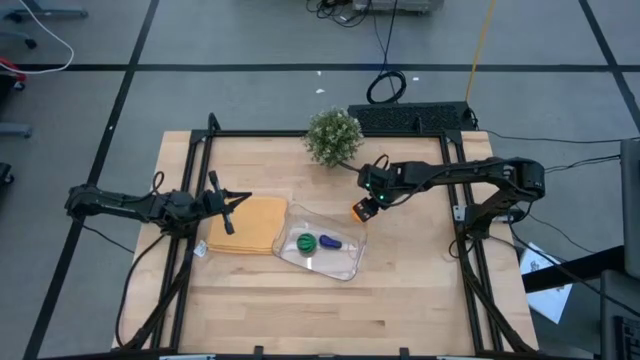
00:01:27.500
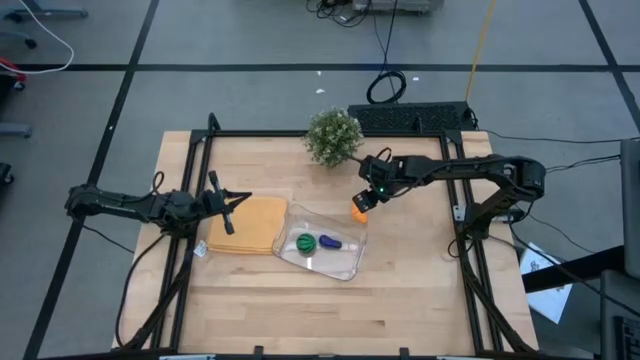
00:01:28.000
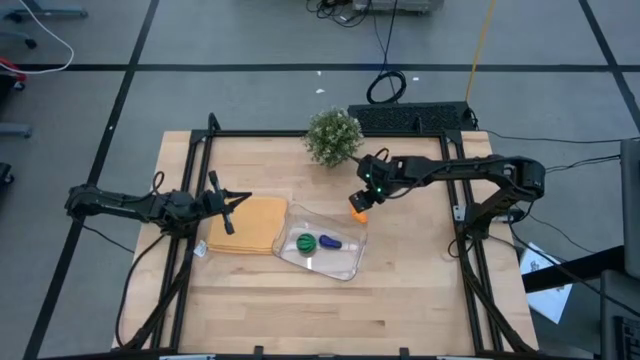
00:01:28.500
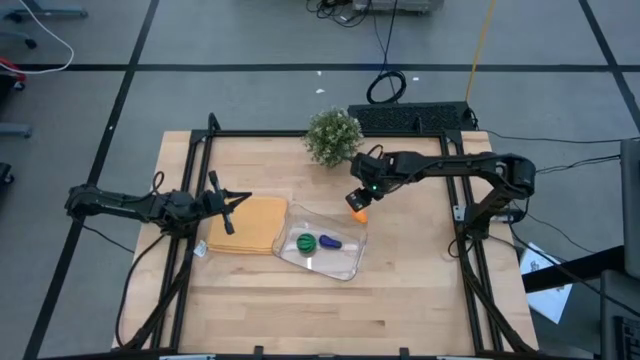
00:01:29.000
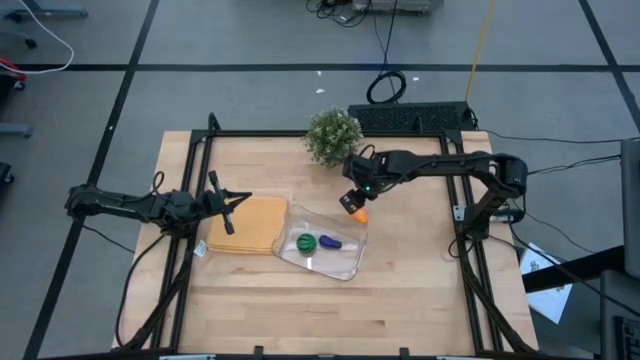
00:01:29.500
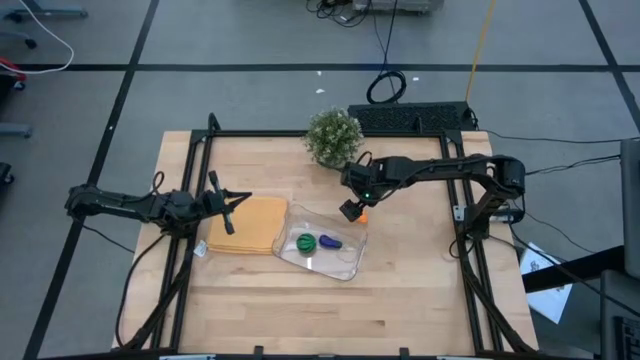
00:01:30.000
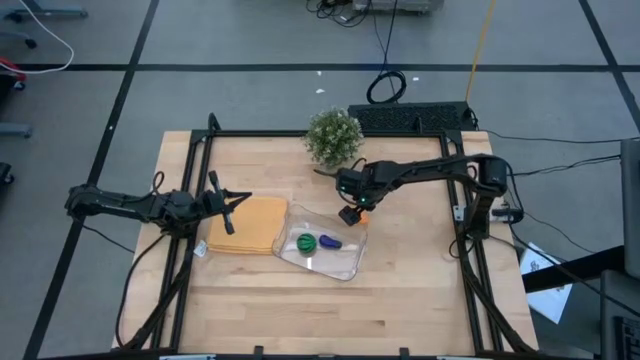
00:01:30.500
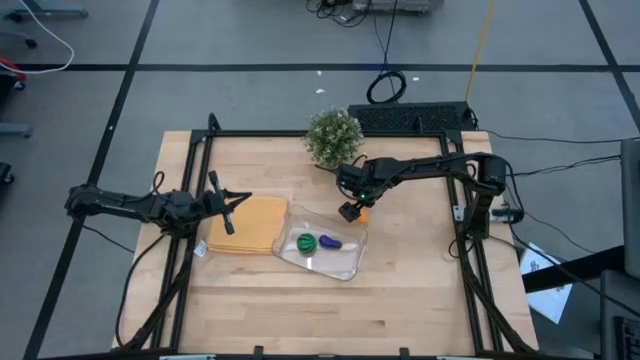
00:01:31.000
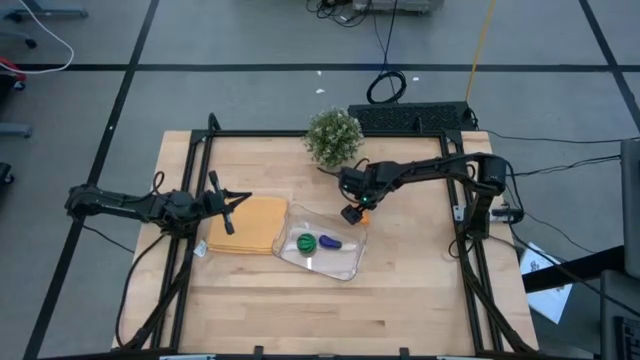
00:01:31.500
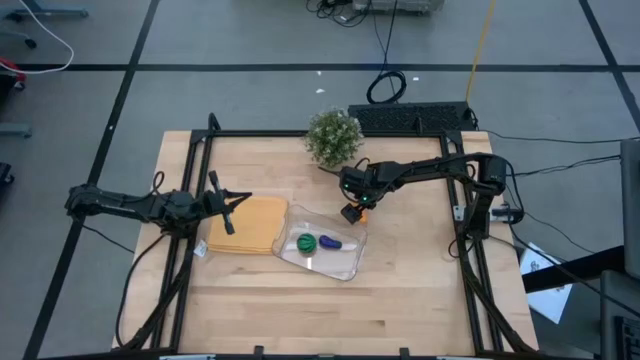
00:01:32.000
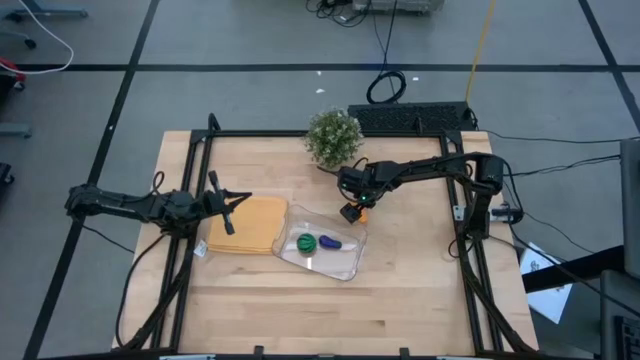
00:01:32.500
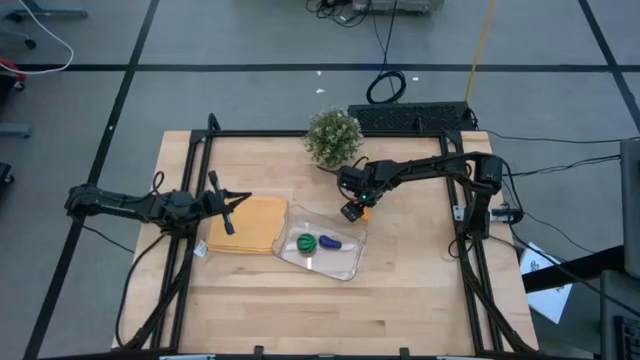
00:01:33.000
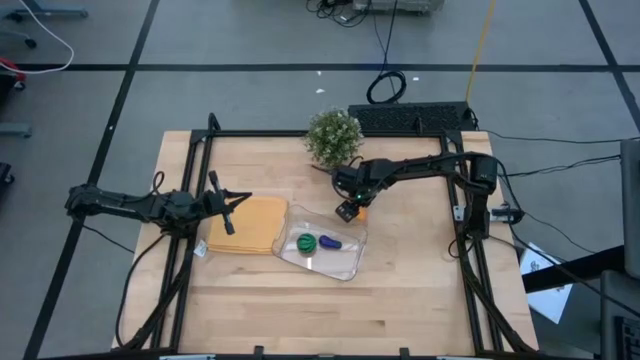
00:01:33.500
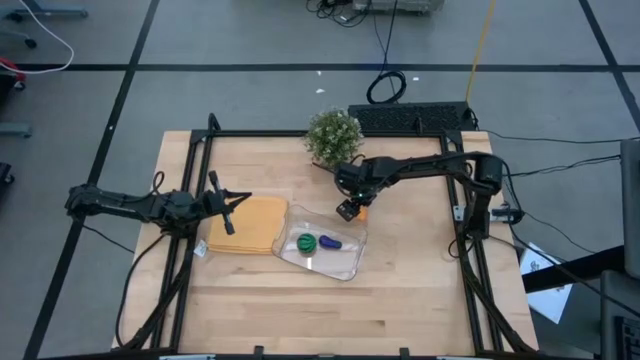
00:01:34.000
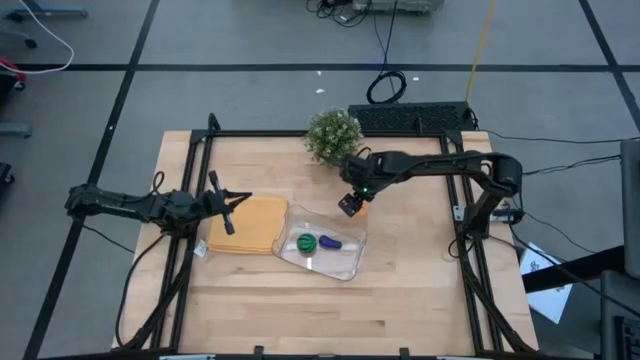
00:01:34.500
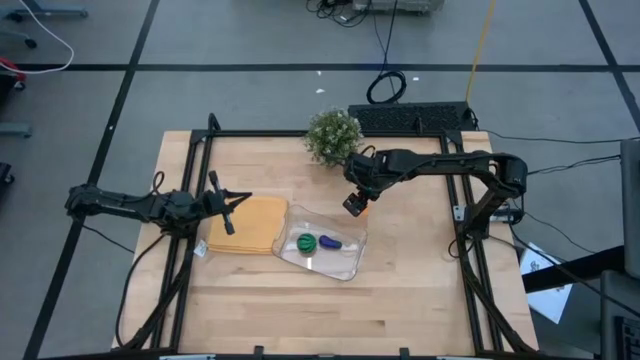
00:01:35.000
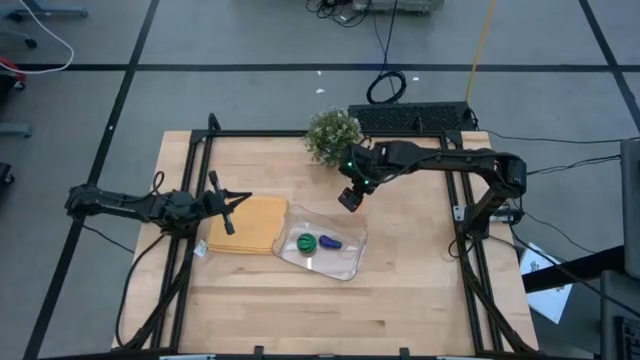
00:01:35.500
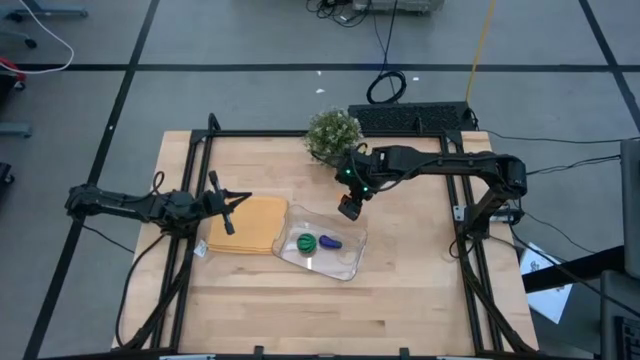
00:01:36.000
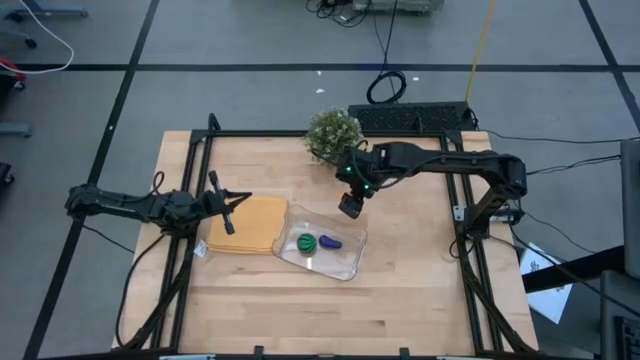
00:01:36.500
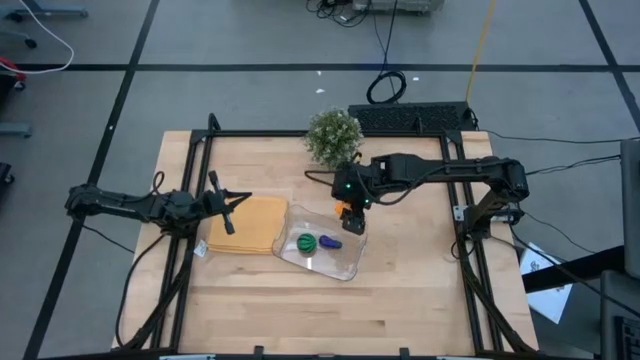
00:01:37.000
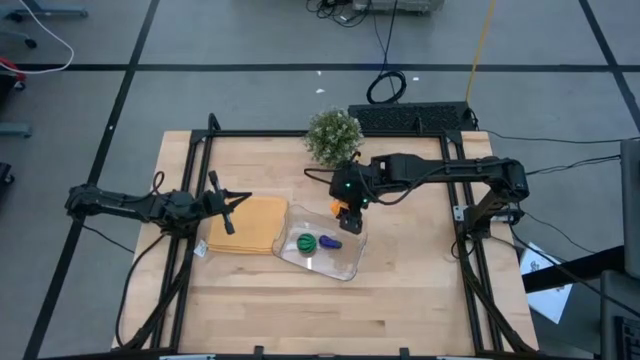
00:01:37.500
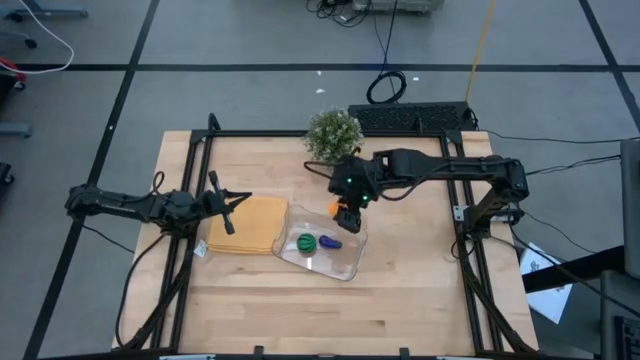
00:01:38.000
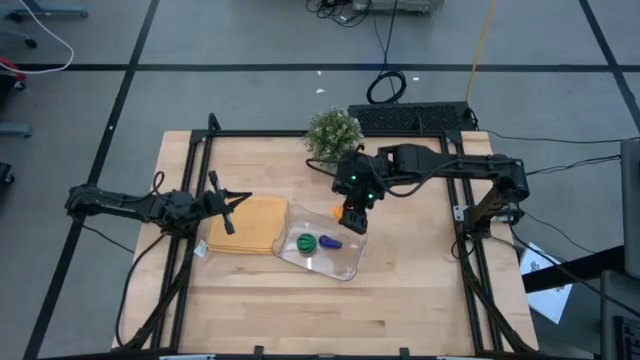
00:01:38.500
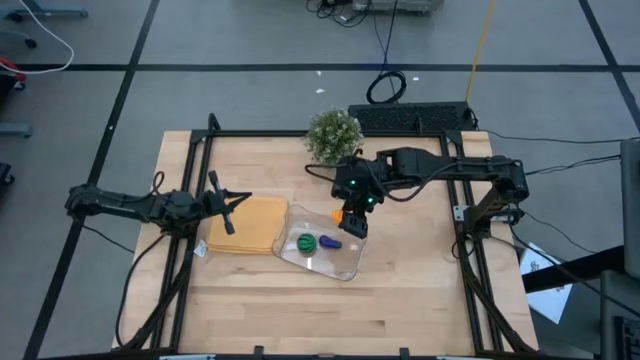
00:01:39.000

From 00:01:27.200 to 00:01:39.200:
Task: Pick and placing Produce into tupperware
Put the bread into the transparent bin

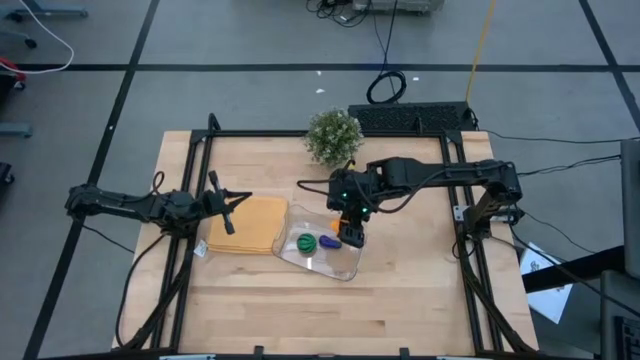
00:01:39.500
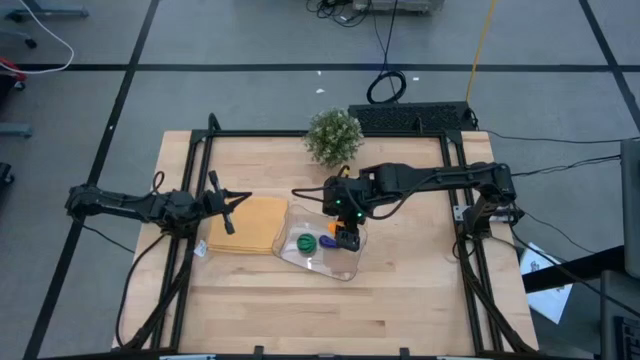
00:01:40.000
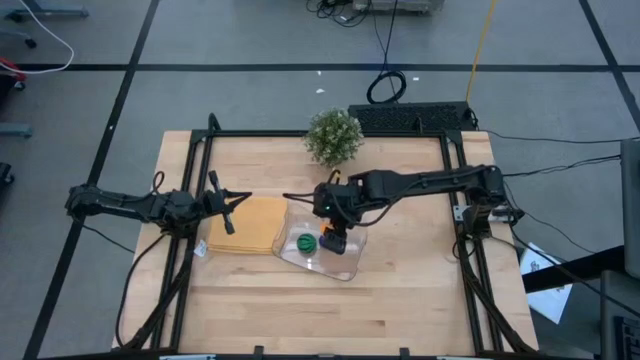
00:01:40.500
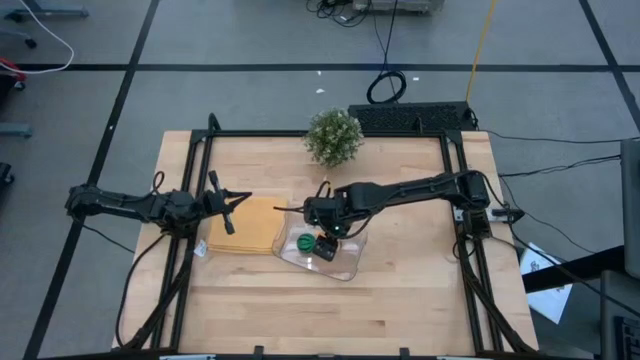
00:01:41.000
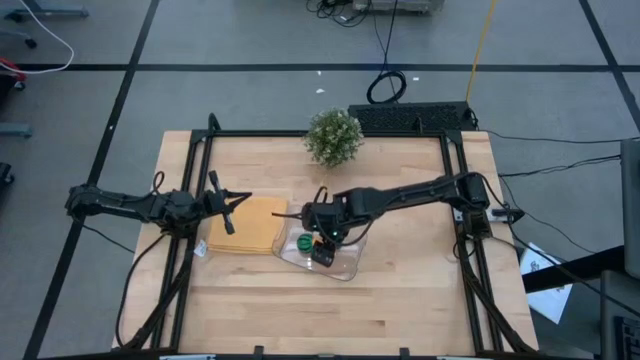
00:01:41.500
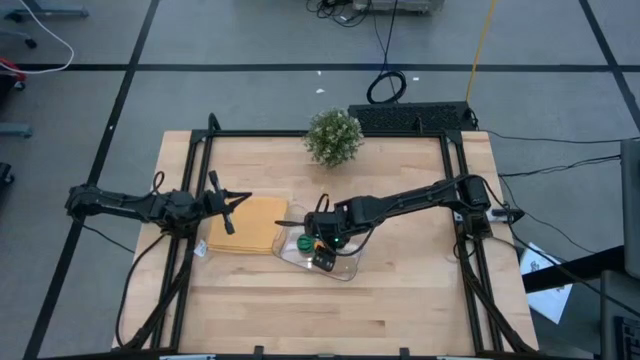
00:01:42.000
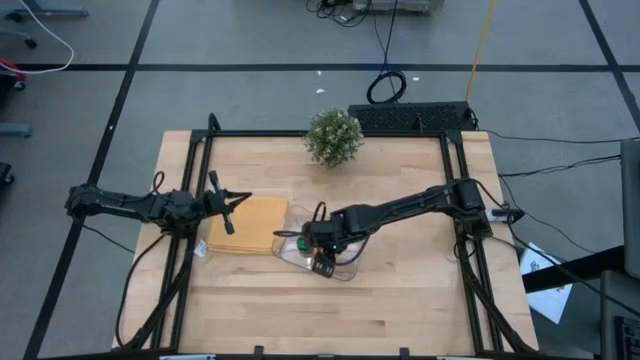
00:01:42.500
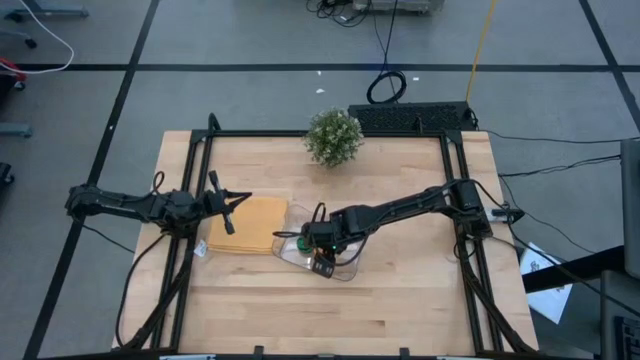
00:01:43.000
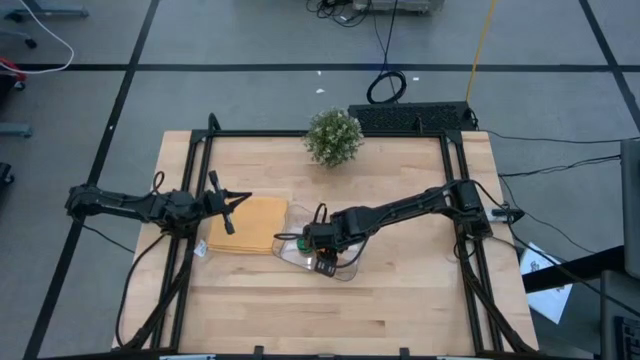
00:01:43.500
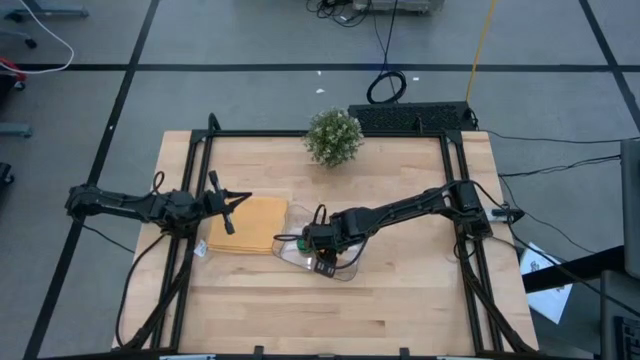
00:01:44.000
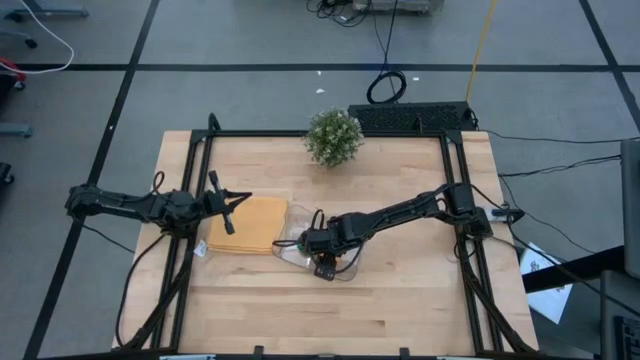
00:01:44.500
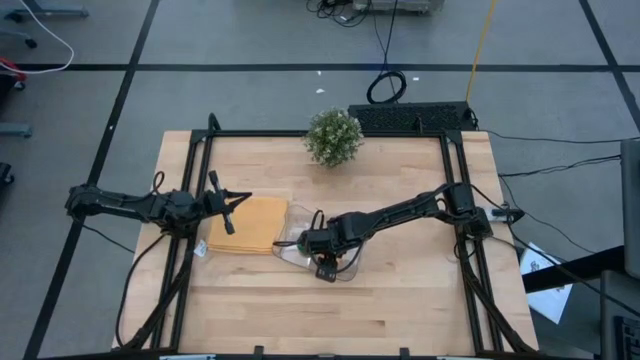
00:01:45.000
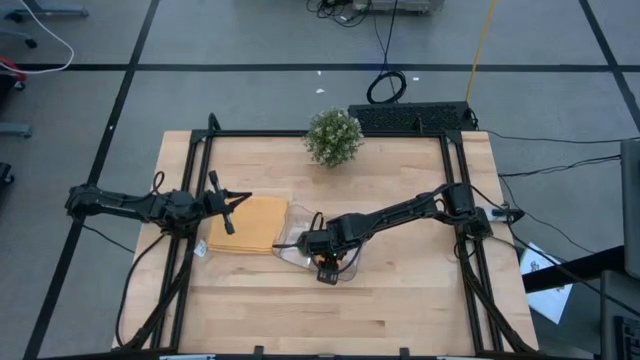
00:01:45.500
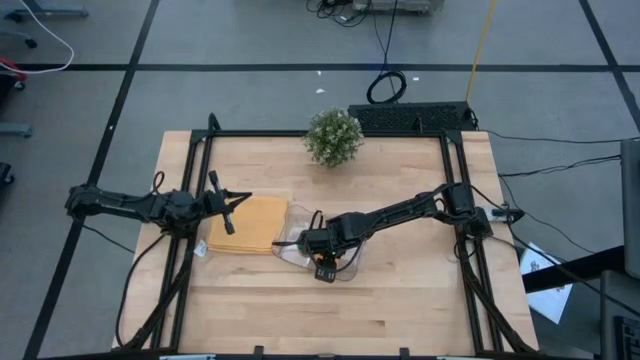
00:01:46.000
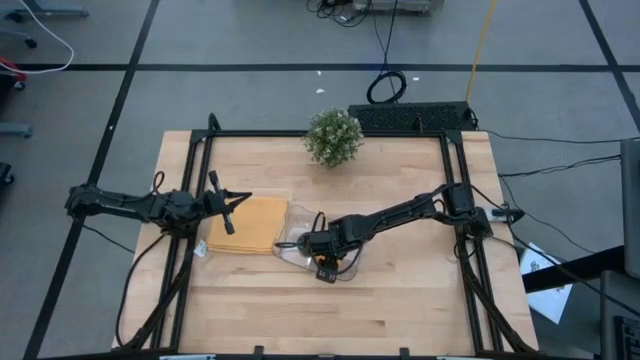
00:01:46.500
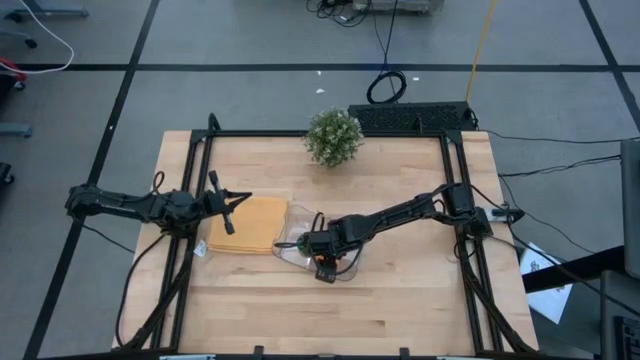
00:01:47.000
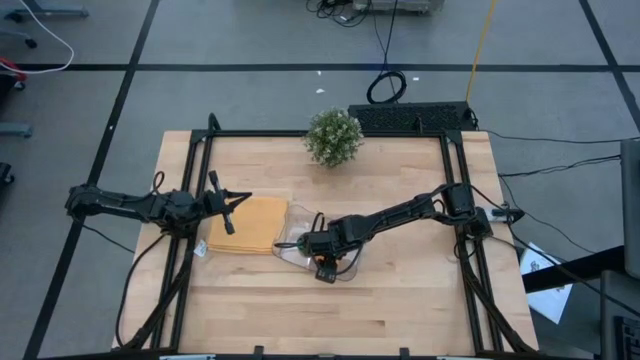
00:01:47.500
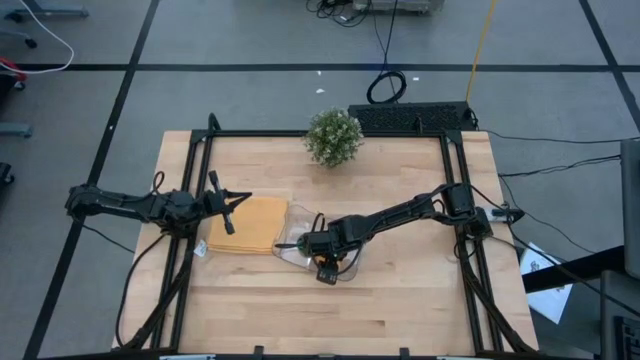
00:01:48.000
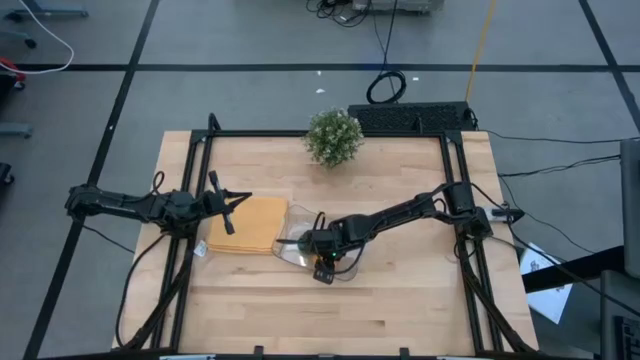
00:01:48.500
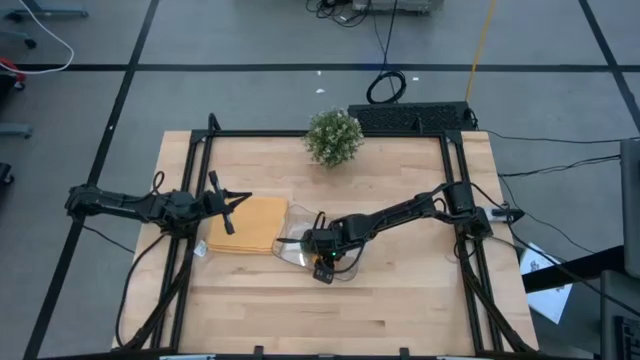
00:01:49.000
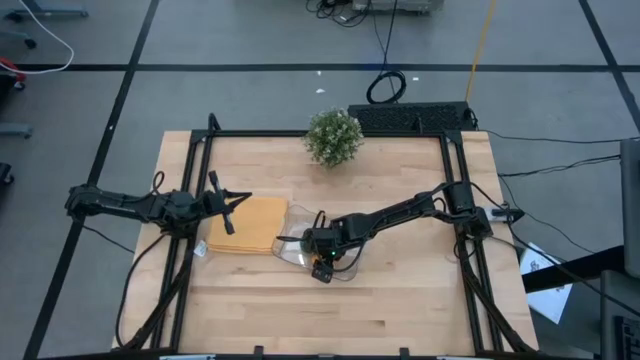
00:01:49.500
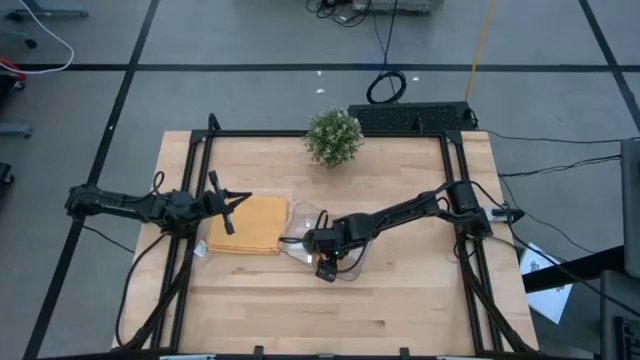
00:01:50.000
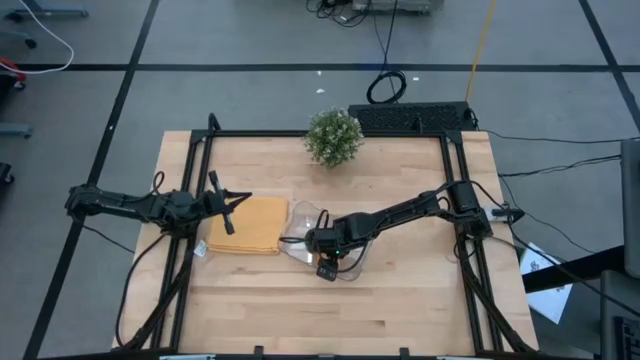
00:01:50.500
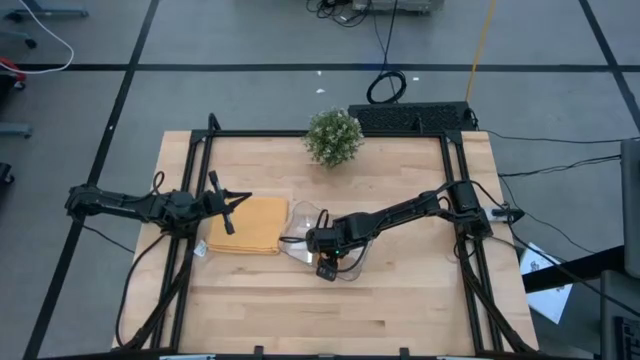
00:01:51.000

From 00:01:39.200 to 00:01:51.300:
Put the bread into the transparent bin
